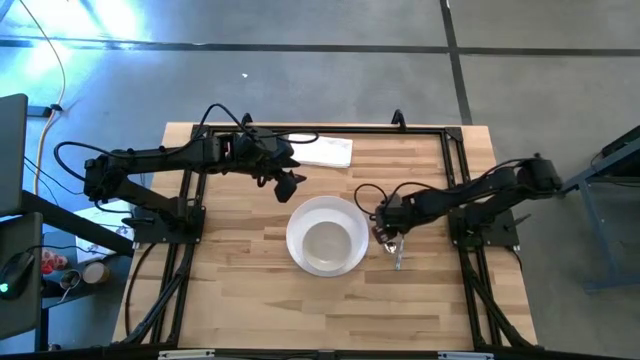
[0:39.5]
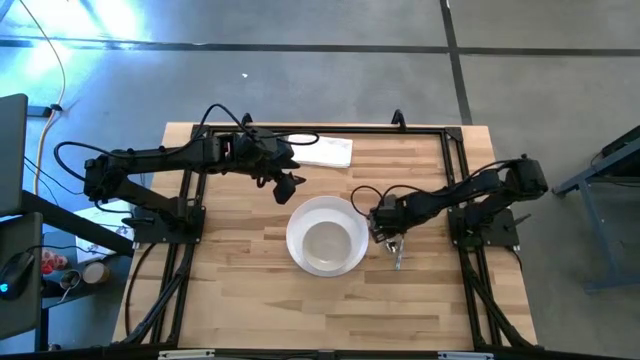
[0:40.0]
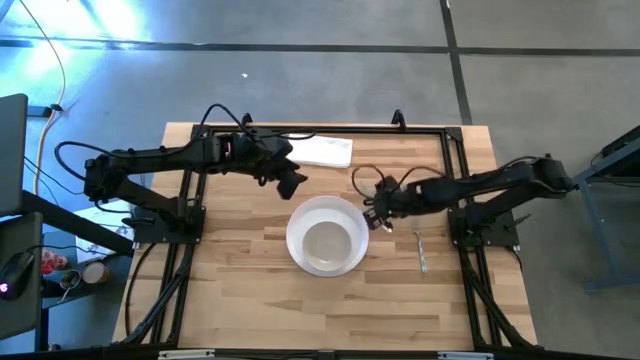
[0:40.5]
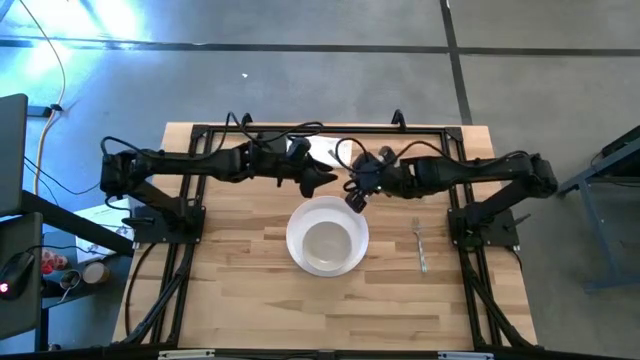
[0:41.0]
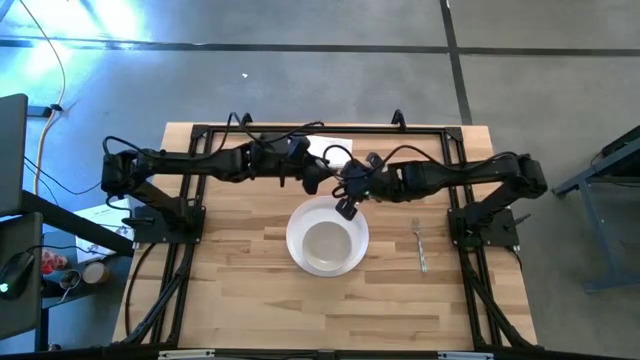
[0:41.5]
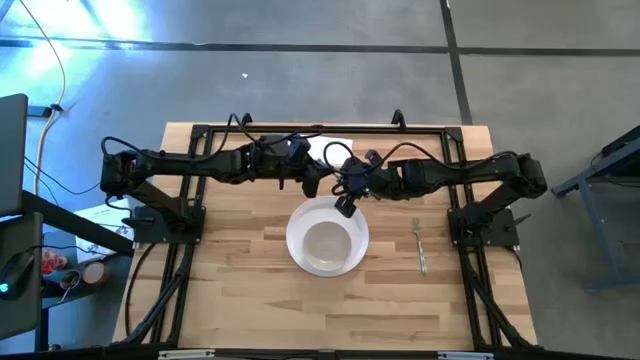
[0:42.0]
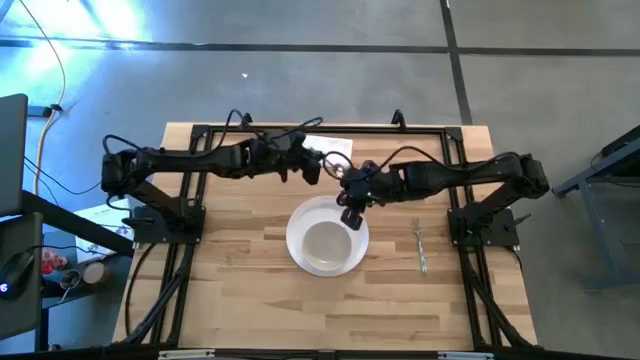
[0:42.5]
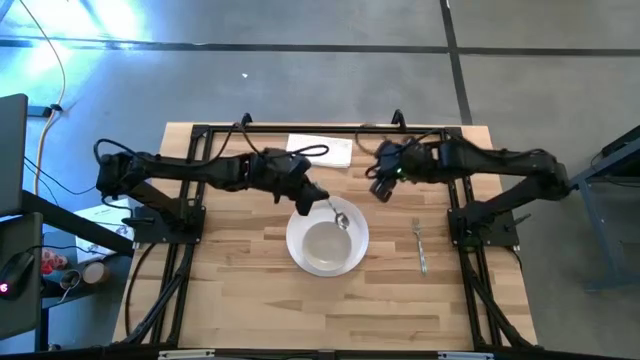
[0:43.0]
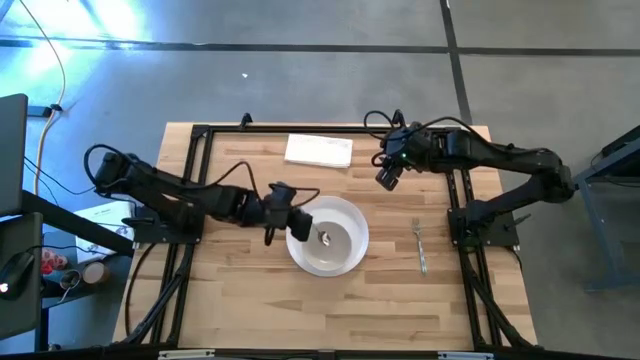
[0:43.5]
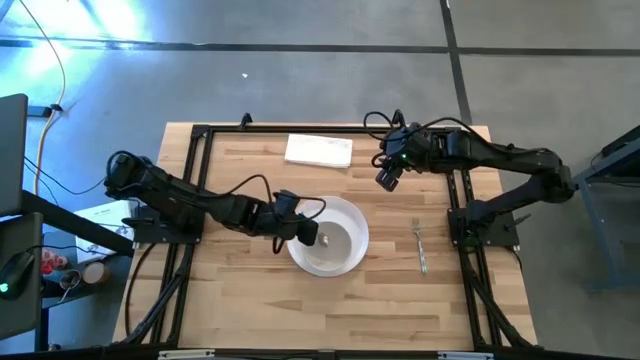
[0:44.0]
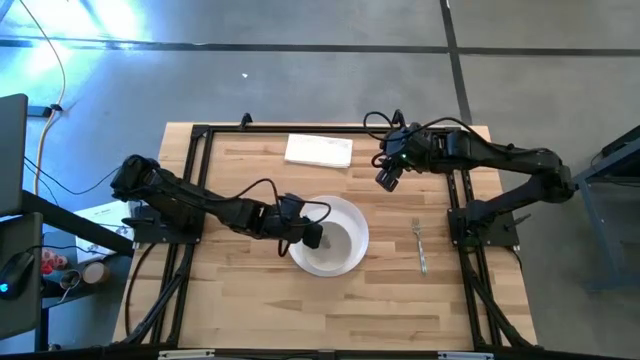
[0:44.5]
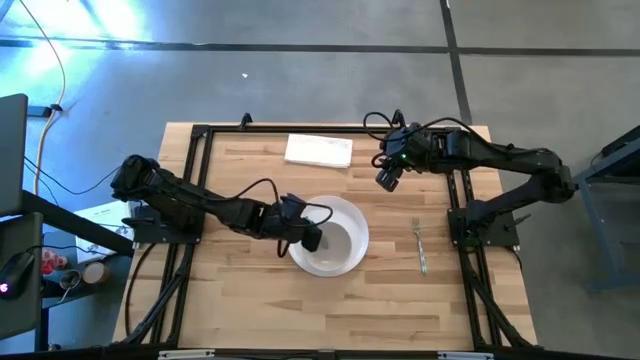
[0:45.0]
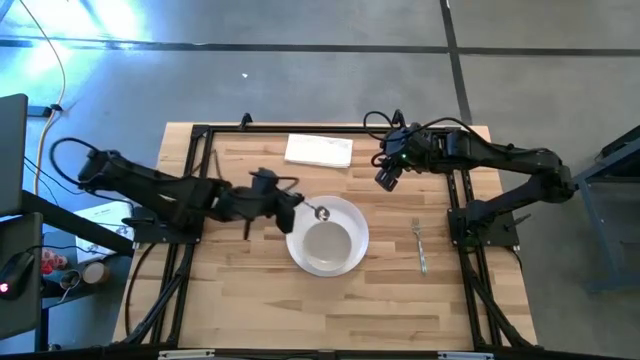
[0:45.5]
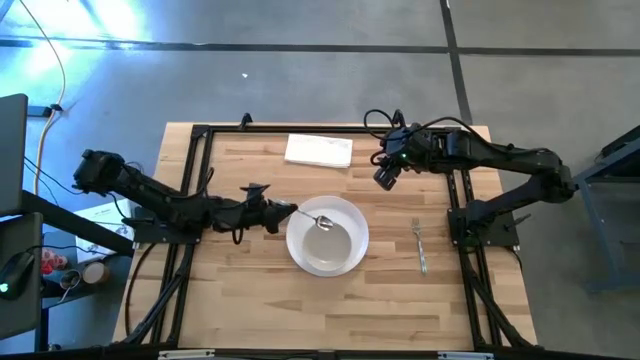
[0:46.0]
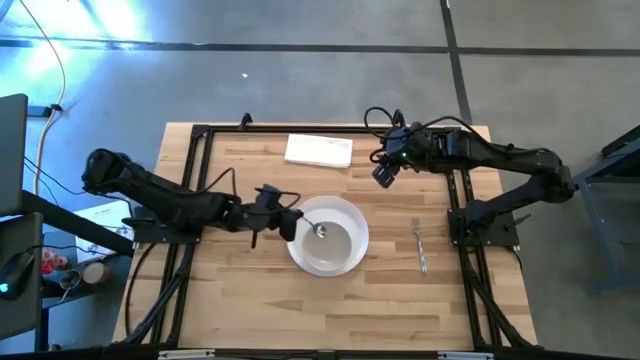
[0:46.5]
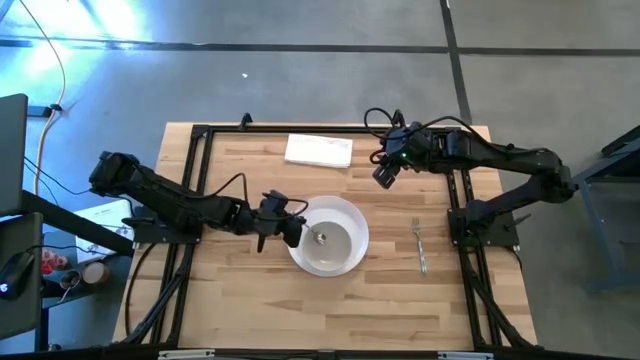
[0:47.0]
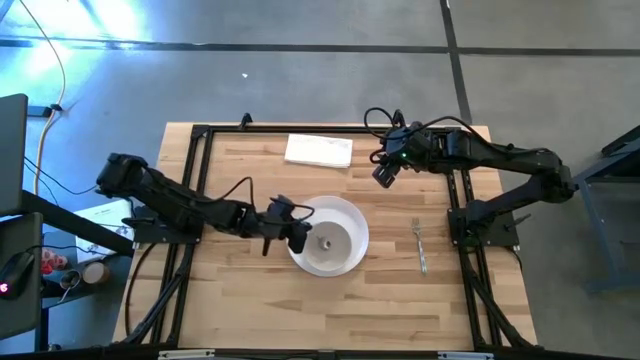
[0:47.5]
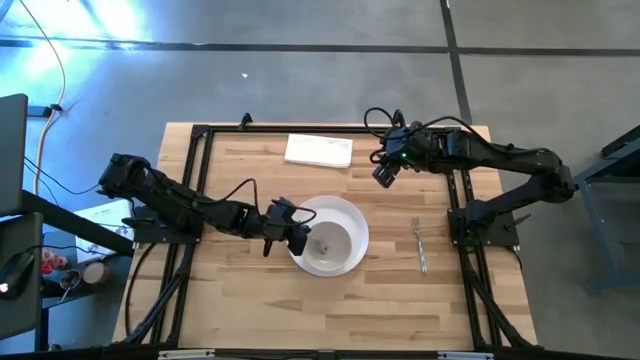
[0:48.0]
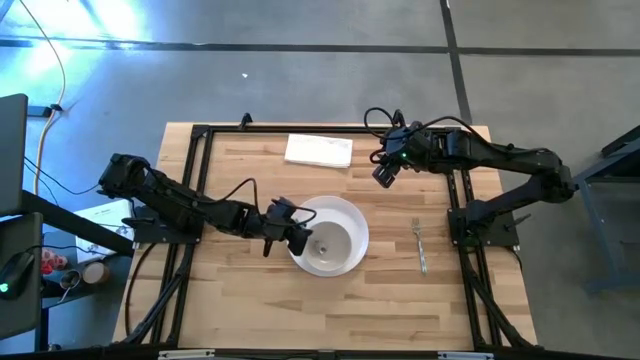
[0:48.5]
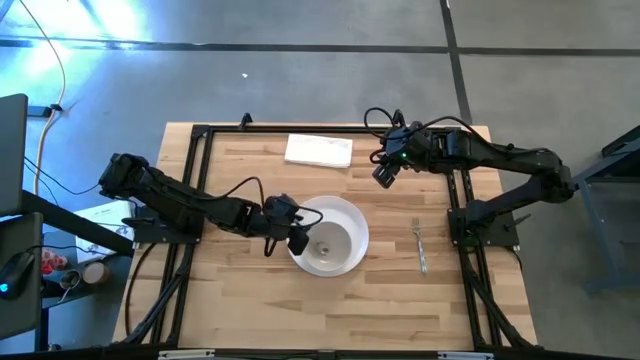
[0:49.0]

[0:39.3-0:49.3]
Task: Set table place
Put the blue spoon into the white bowl

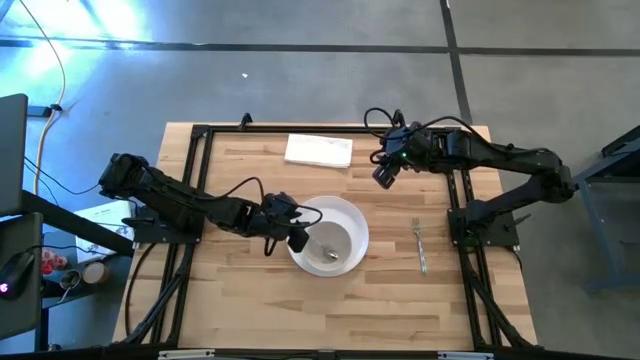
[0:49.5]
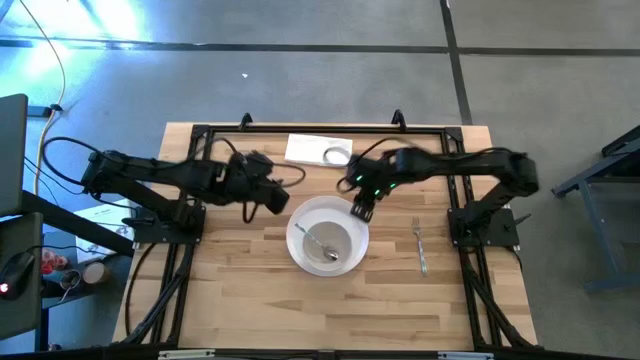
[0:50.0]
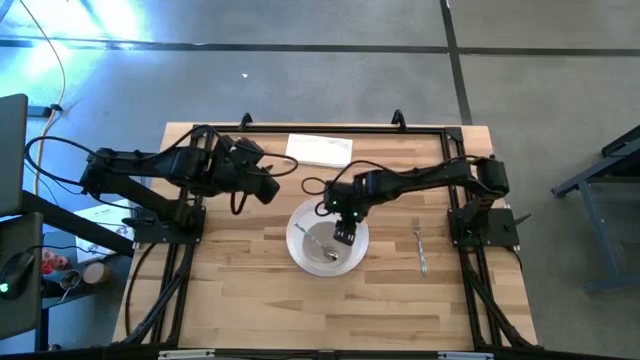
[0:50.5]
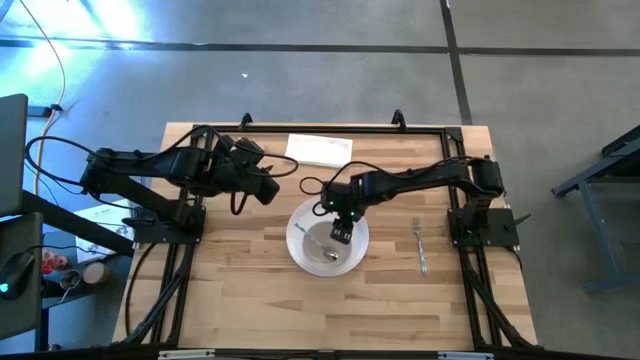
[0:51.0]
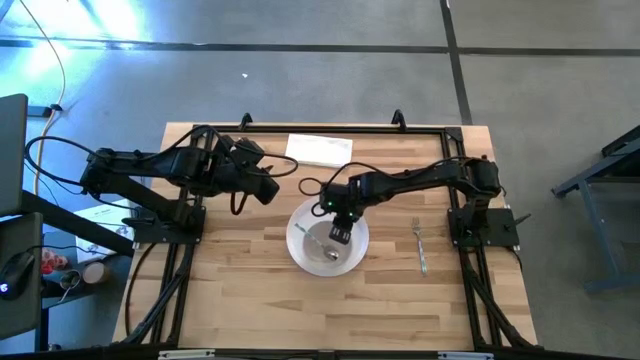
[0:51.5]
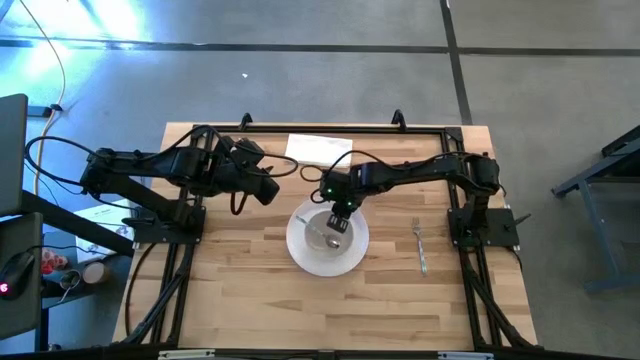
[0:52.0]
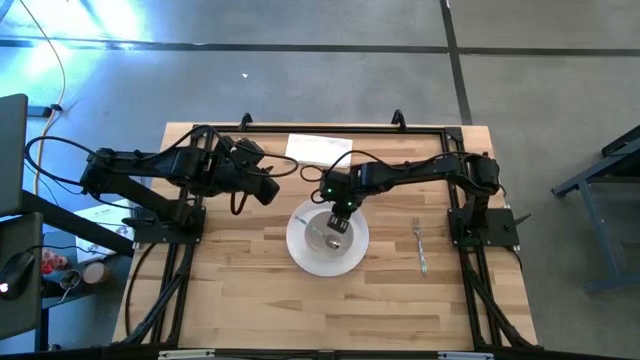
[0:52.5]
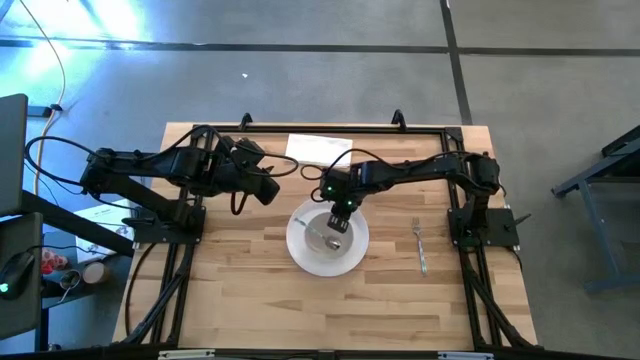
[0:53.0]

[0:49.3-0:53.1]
Adjust the white bowl on the white plate

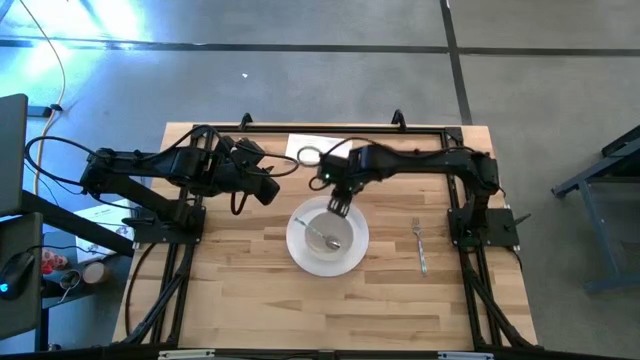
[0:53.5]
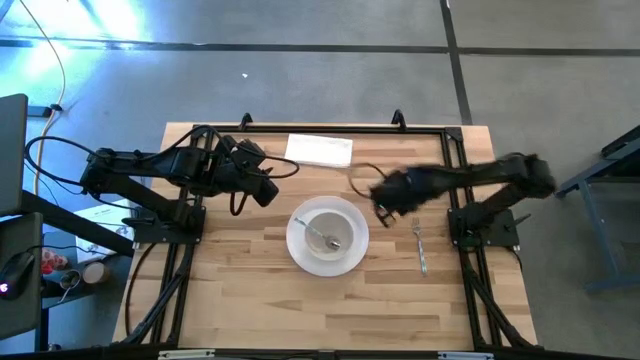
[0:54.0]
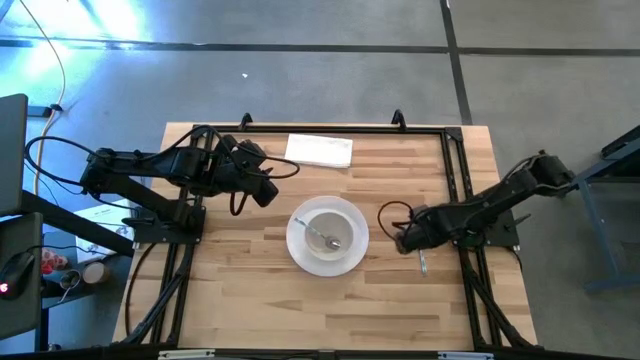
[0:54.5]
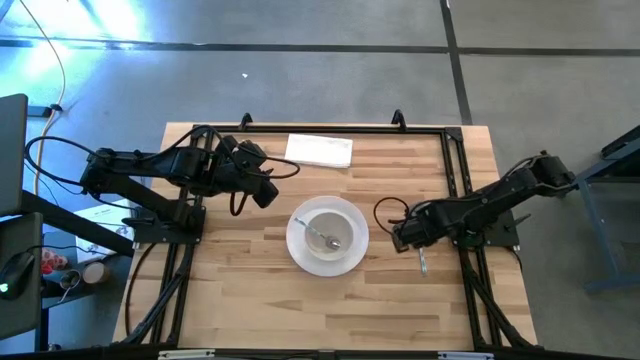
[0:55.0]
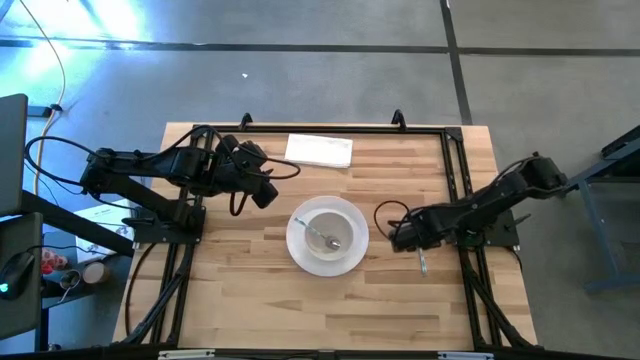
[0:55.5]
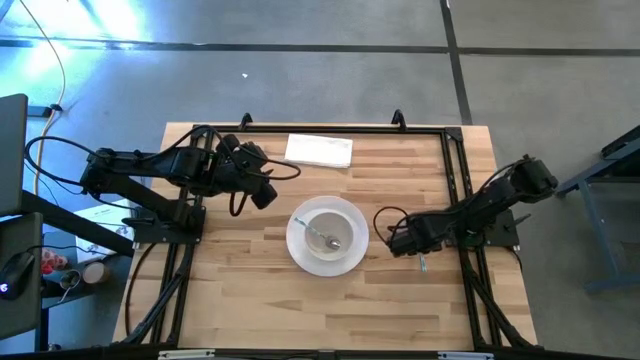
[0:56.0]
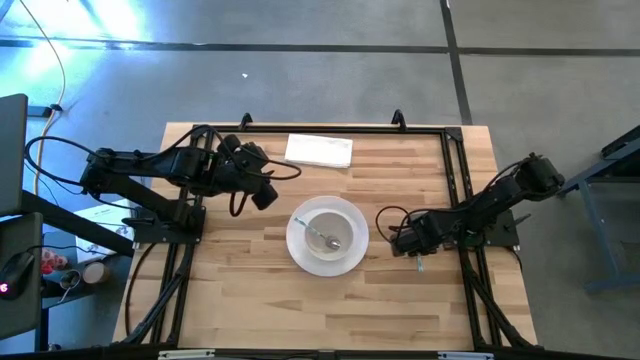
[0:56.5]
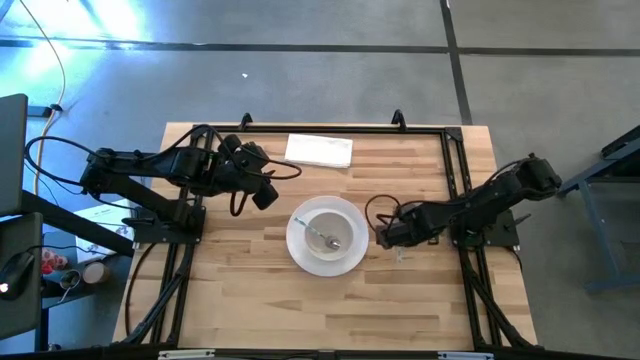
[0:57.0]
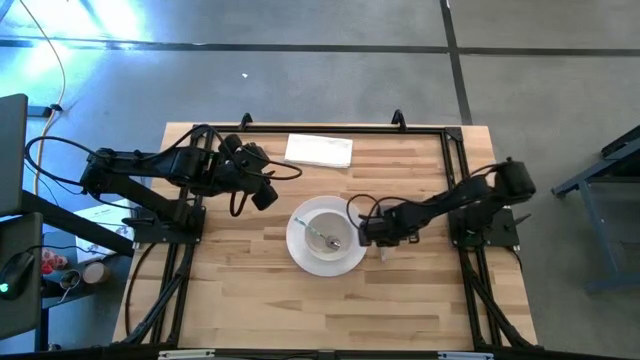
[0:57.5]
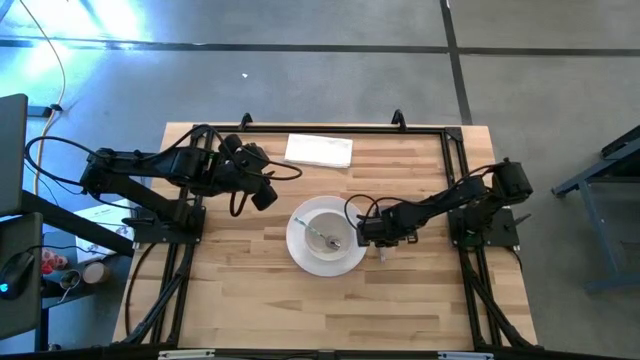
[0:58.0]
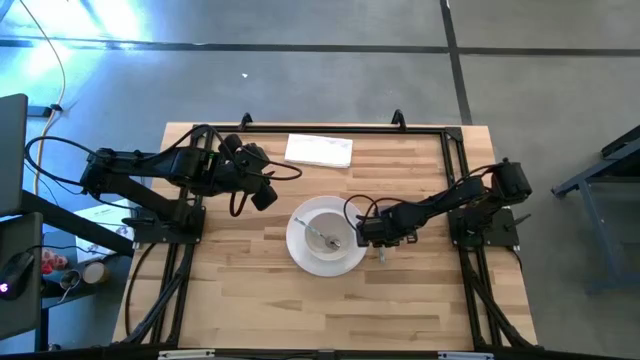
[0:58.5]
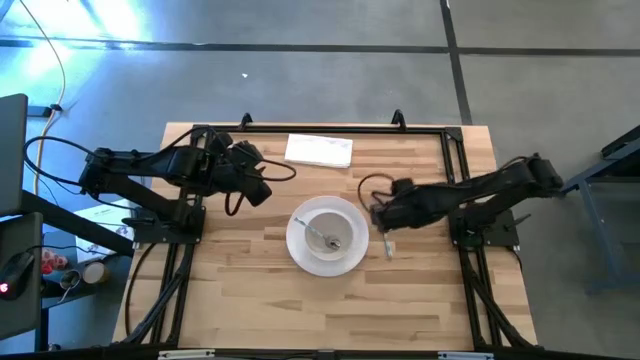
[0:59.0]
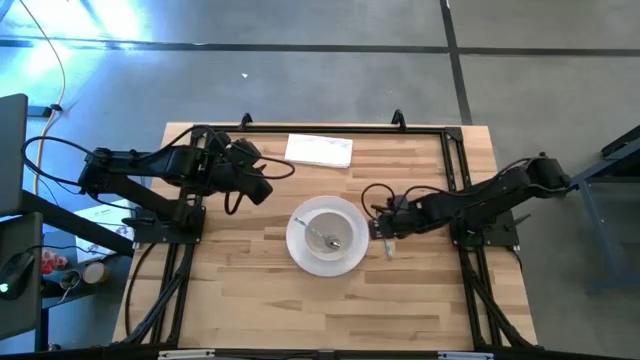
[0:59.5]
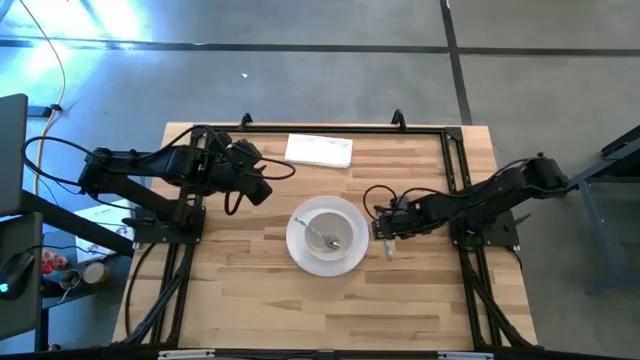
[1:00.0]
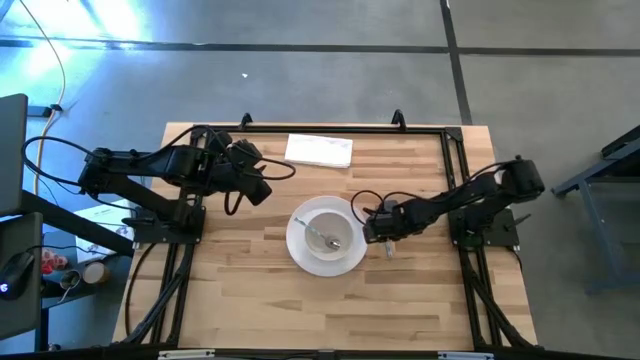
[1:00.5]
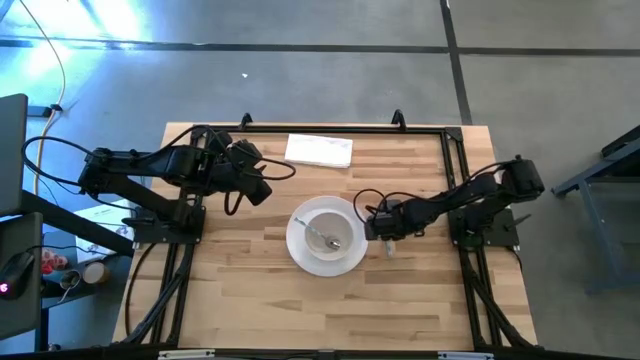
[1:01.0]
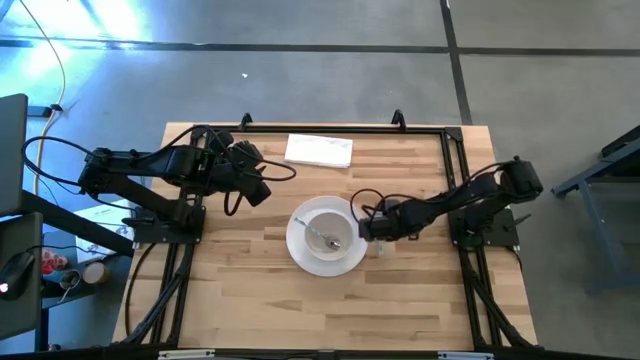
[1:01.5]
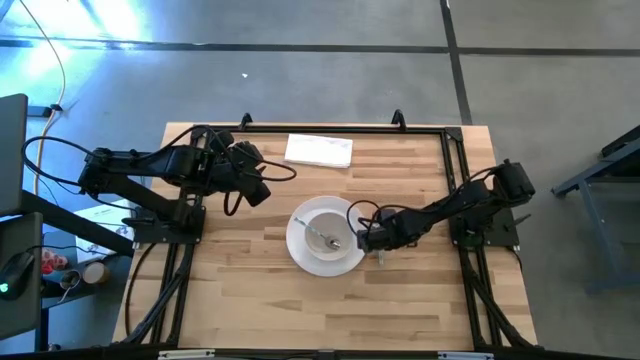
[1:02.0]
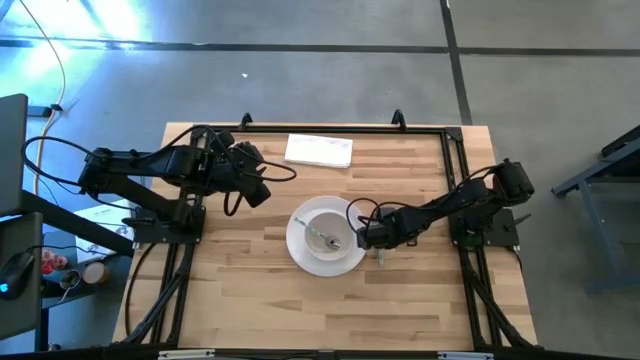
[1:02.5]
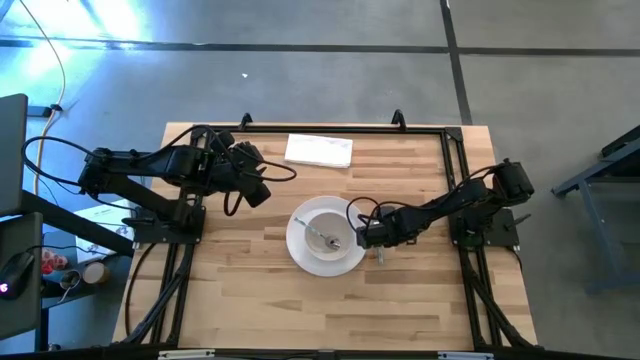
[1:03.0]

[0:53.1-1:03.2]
Put the blue fork to the right of the white plate
